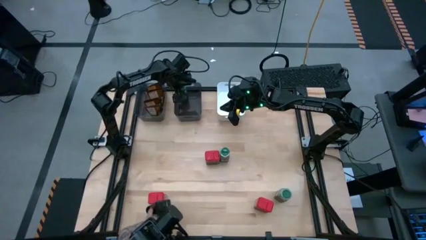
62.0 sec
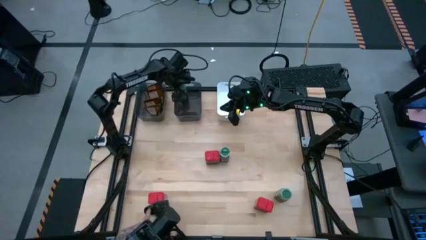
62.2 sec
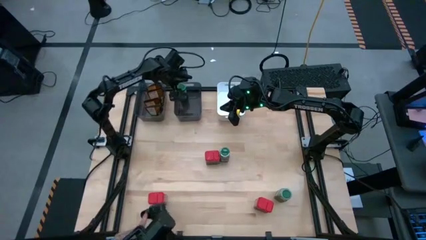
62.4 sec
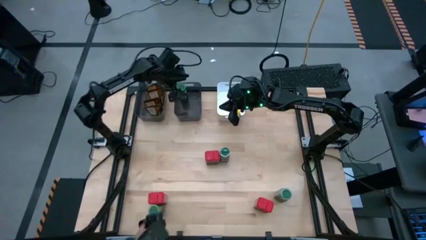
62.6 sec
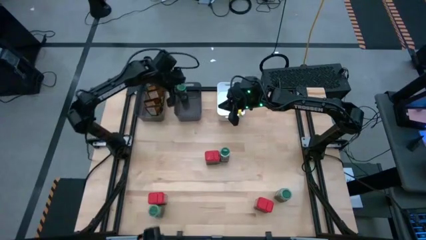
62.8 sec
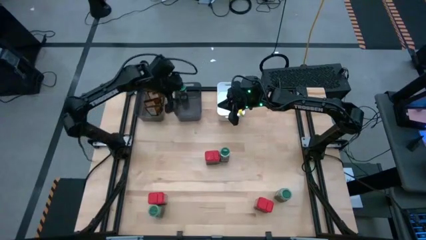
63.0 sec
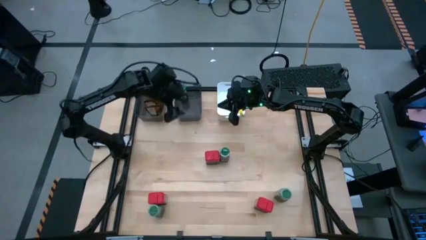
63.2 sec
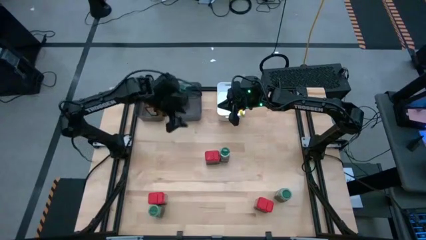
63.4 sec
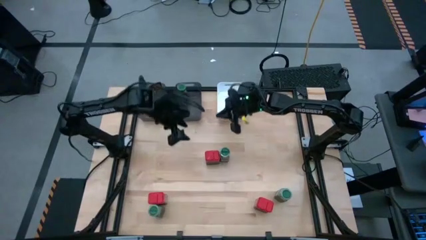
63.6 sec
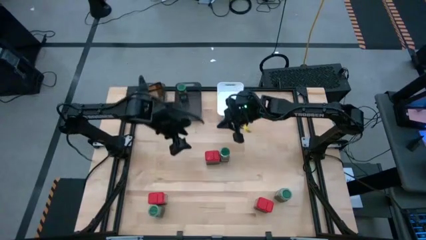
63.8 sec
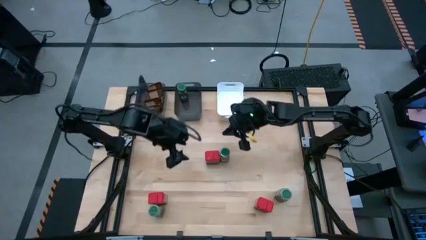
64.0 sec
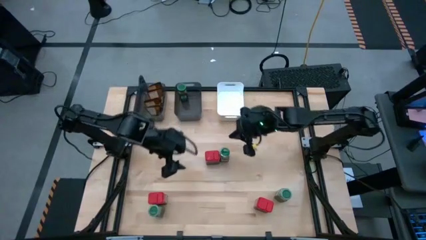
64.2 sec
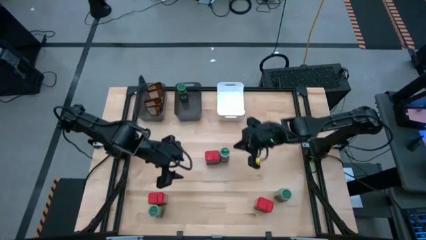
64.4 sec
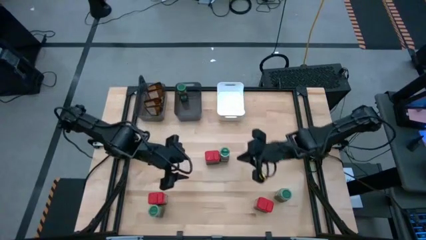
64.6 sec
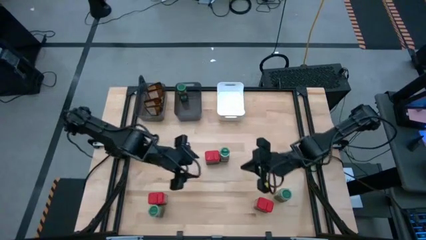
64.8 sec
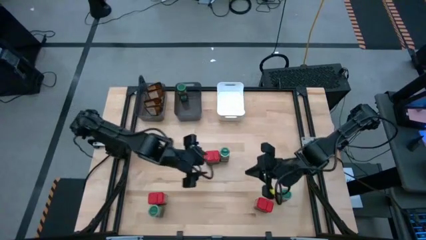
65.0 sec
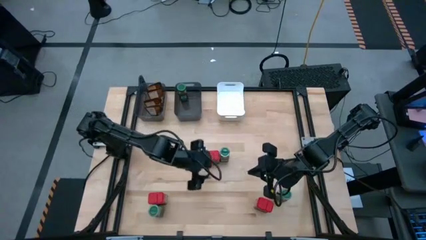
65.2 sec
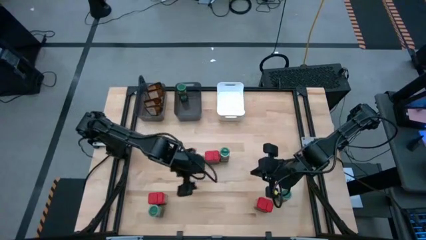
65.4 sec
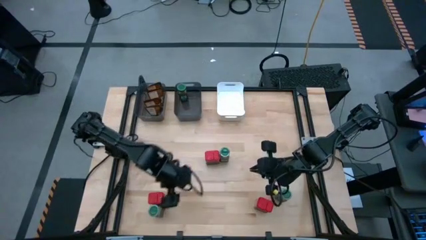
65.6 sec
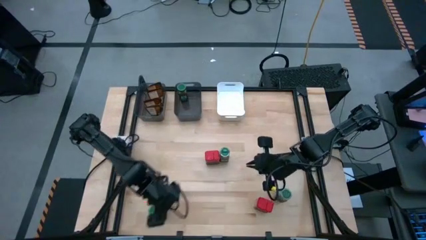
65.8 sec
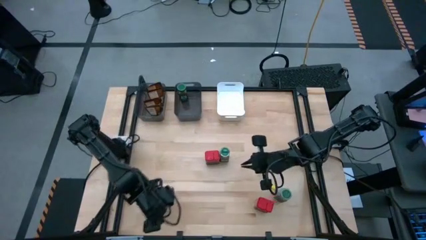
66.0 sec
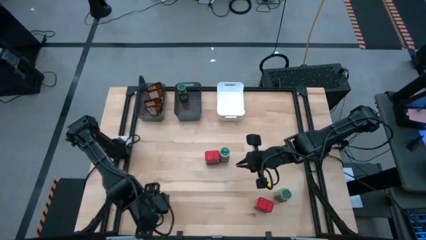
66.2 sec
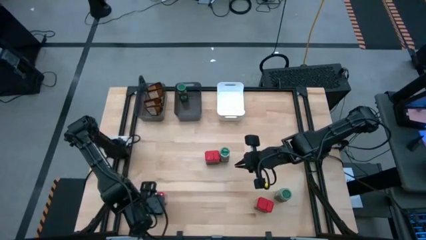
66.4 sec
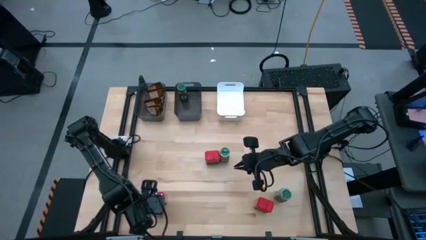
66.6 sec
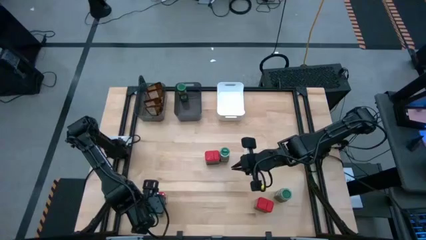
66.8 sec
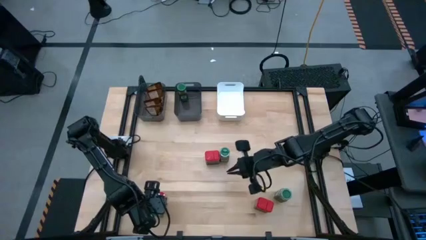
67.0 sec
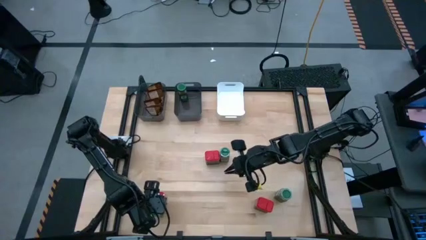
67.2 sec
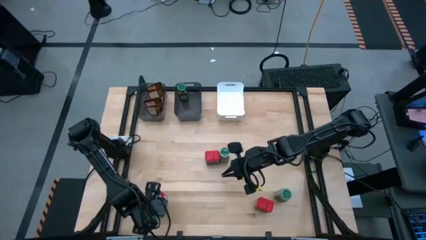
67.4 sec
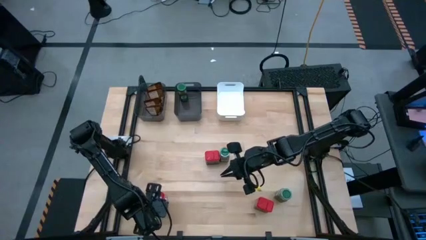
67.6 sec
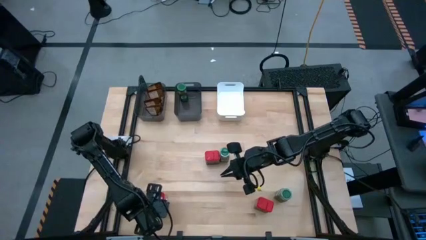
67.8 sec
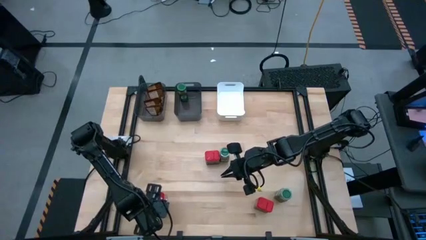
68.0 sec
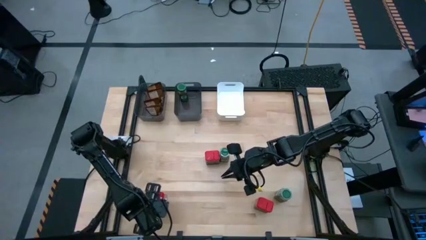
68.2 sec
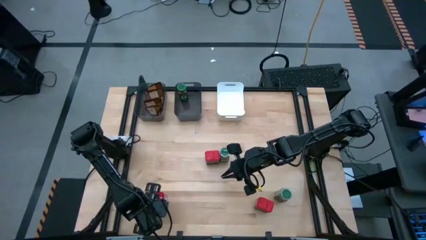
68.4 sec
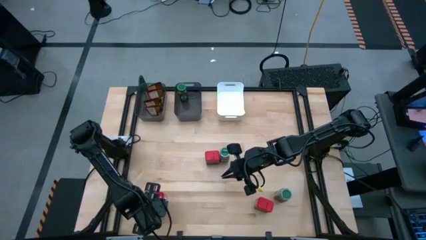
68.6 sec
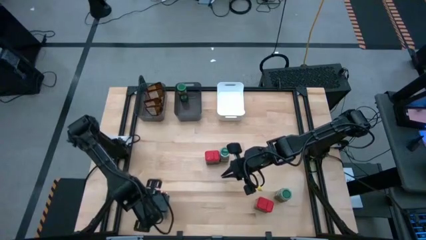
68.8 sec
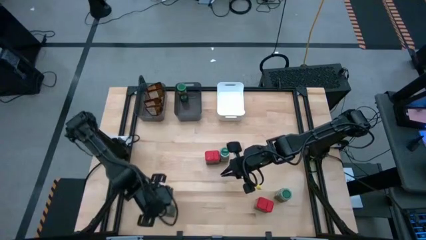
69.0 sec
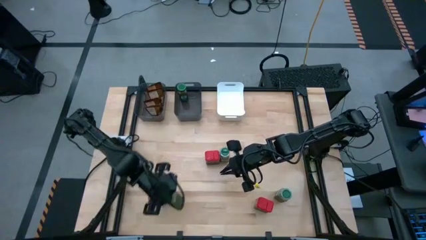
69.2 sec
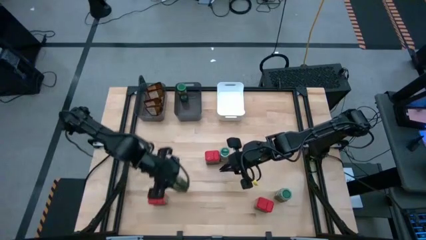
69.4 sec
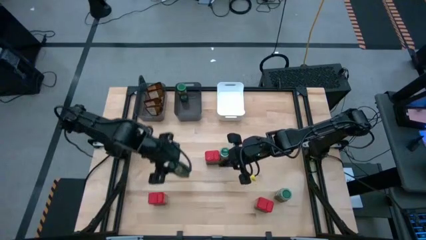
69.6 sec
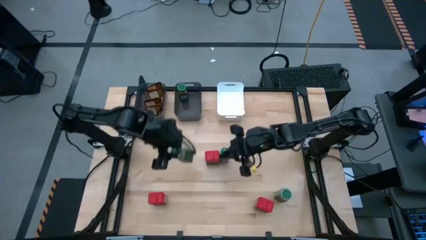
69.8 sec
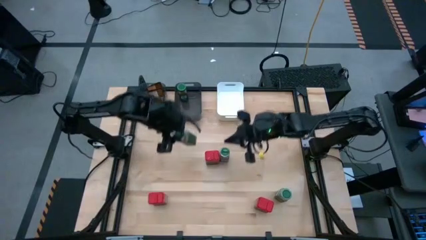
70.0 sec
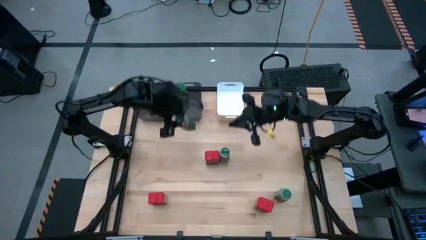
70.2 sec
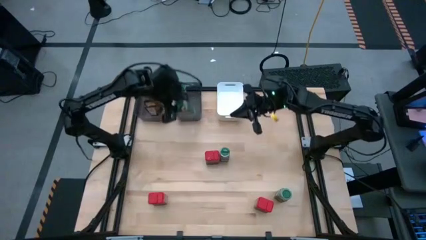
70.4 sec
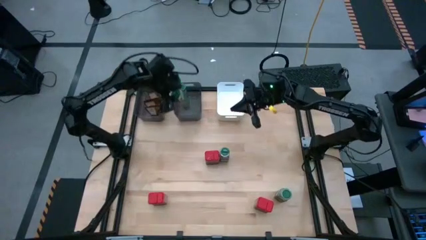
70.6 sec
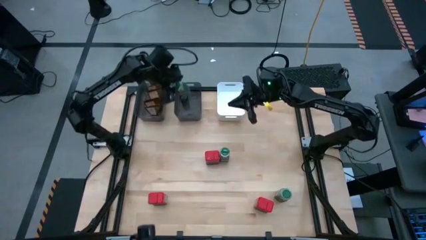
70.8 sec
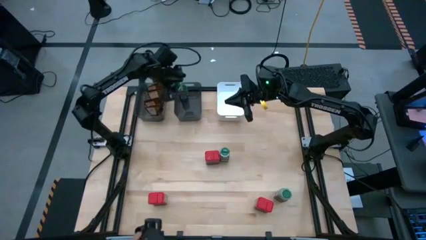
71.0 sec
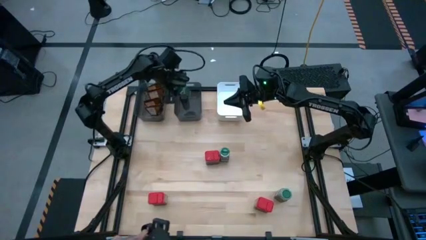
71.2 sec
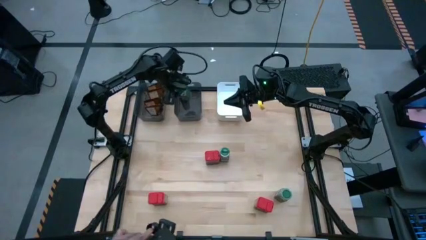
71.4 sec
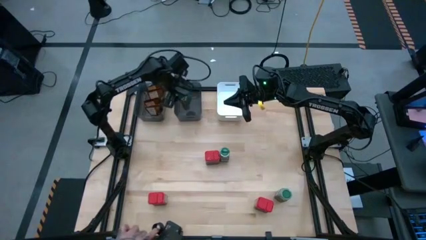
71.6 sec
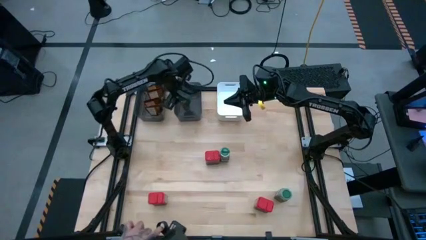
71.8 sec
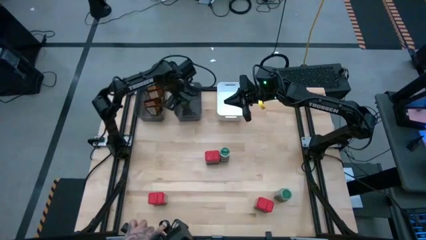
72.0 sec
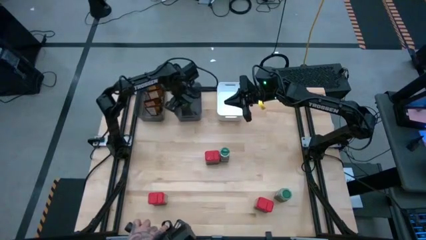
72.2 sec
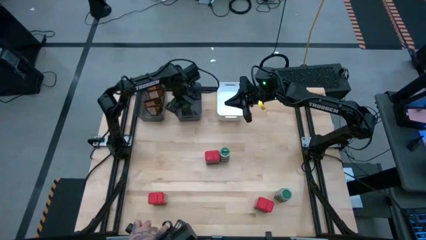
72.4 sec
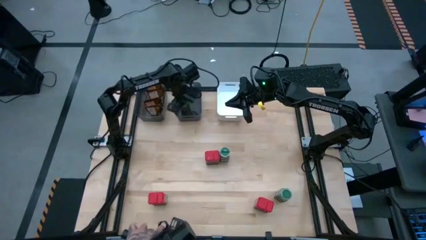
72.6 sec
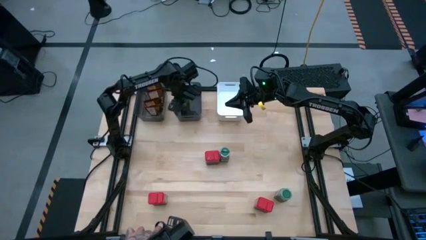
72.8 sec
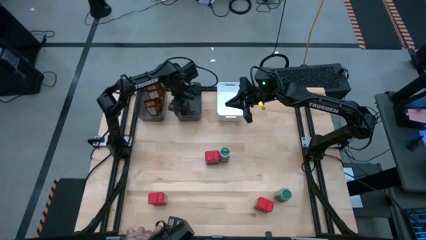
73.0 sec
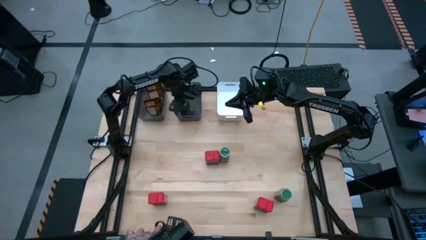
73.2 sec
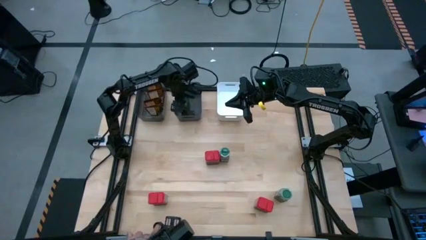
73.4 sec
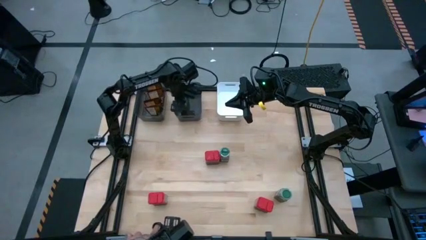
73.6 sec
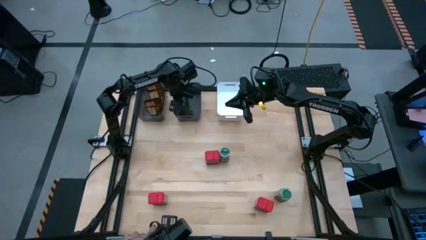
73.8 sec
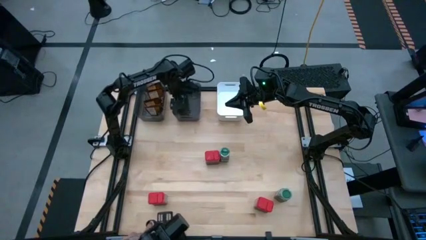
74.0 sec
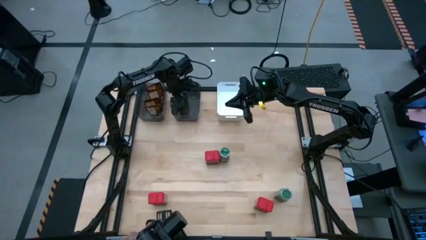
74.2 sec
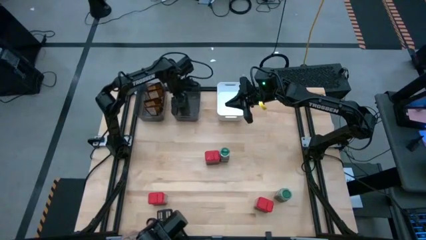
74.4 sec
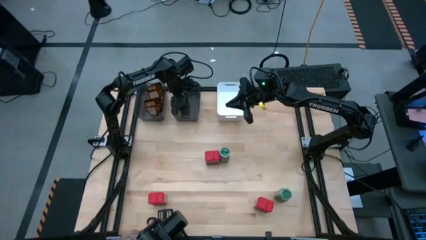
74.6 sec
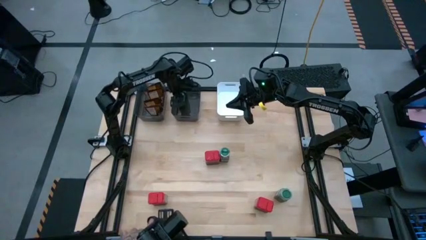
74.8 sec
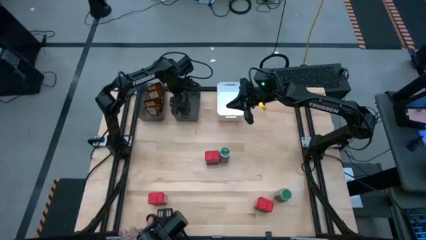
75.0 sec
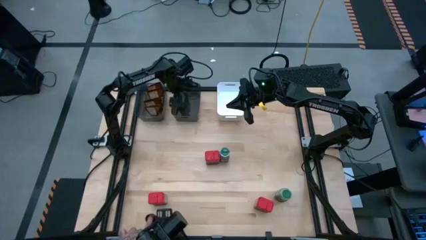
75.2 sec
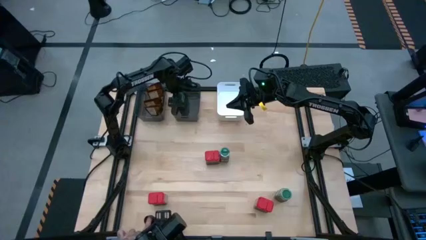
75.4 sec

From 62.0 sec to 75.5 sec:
Task: Sort spices by type
Put the bottom left green seasoning bottle into the right black bin

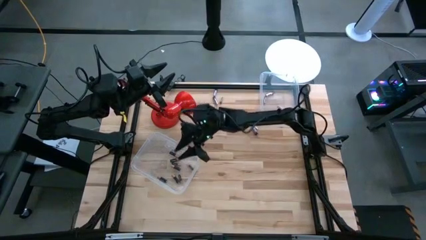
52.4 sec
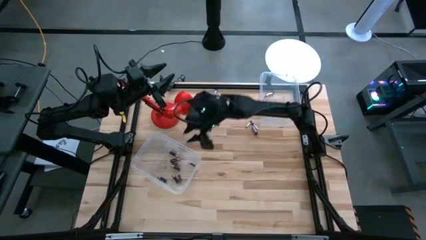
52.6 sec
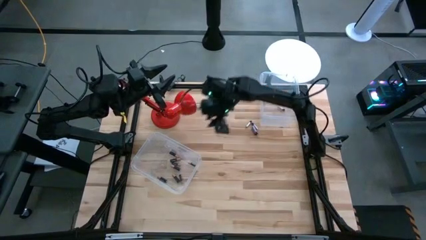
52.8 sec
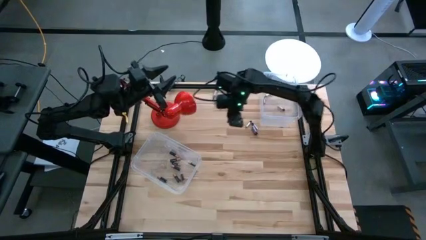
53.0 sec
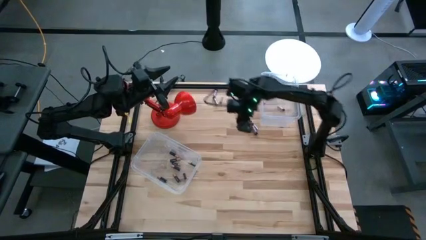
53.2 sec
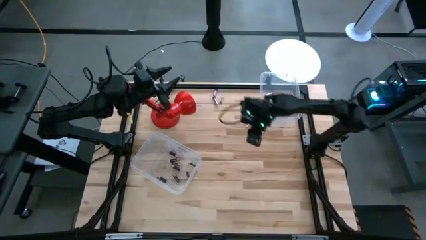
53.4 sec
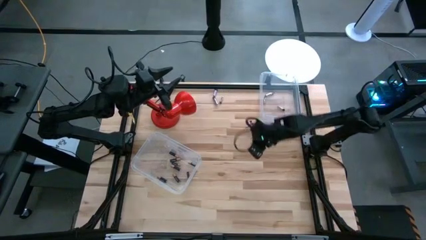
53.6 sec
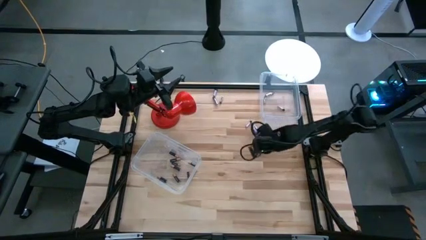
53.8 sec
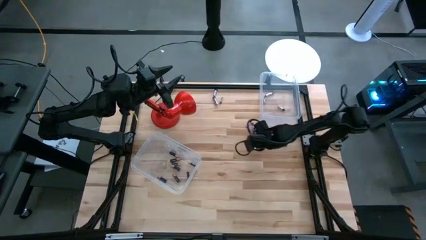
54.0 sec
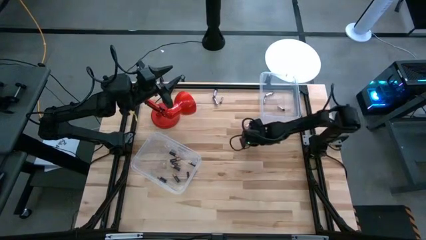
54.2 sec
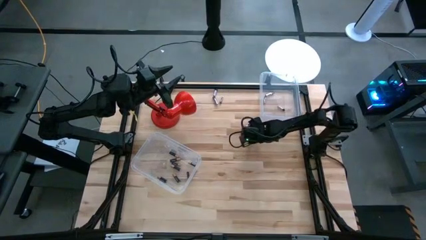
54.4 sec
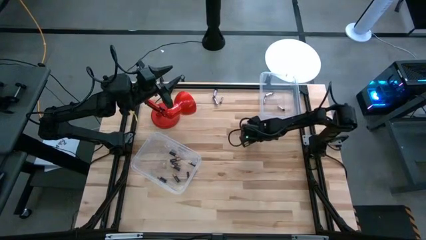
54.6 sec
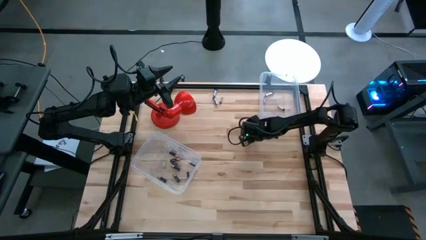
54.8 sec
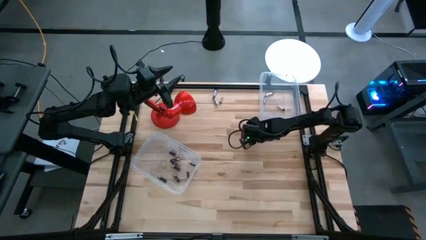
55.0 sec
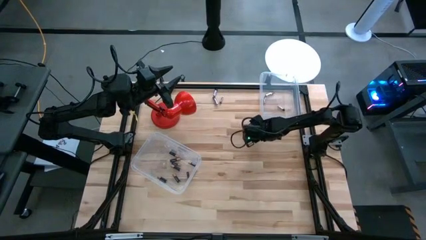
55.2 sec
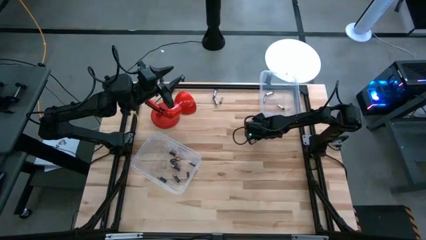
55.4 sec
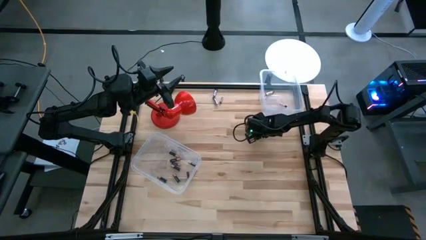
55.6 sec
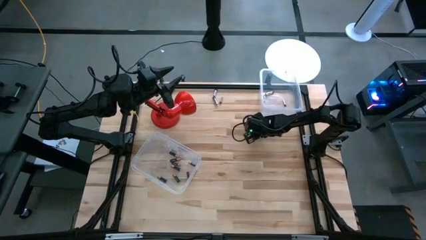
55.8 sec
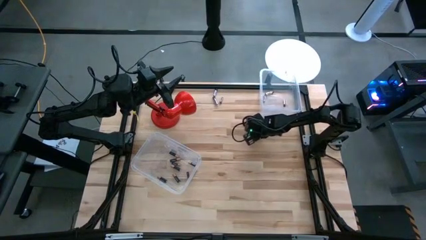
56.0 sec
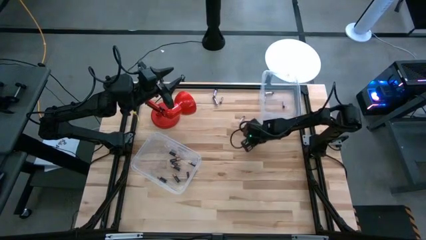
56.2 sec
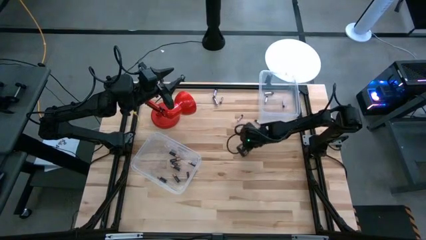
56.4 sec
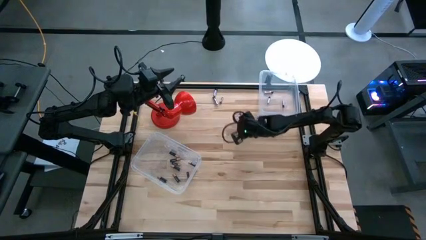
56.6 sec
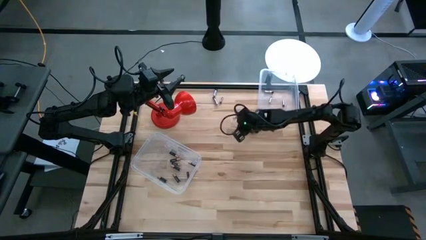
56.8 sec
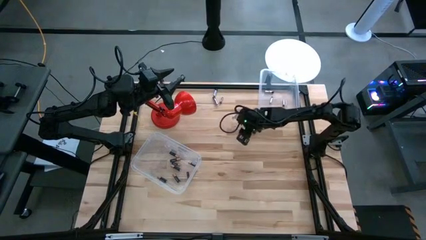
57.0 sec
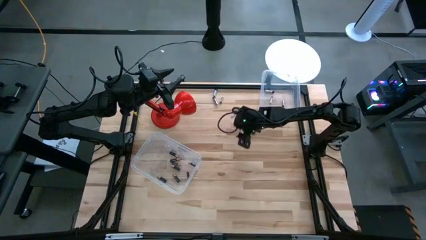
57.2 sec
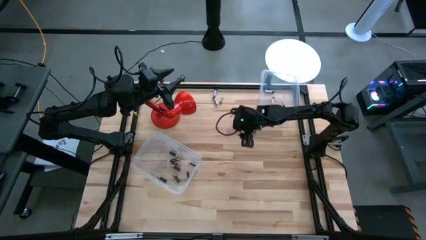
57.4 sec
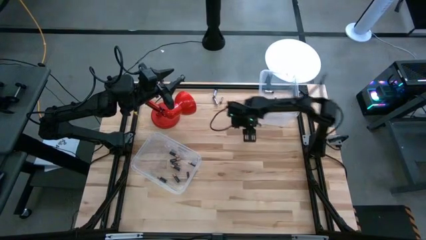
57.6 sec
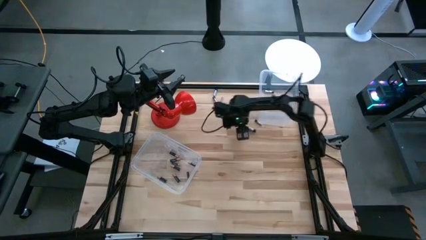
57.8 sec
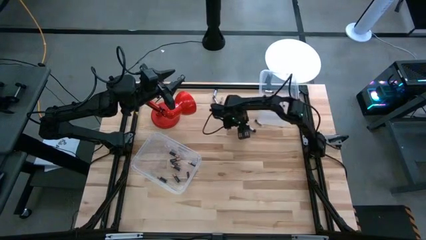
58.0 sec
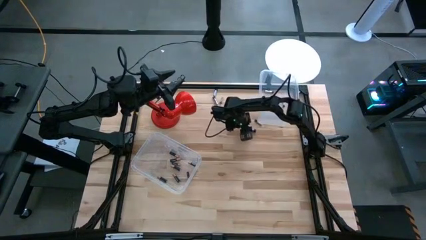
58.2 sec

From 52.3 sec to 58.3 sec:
Task: Sort batteries
Put the silver battery into the top transparent bin
